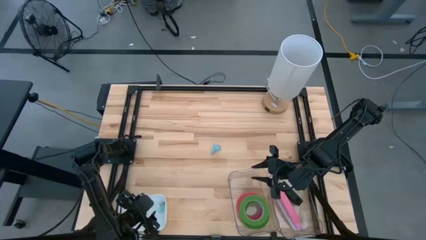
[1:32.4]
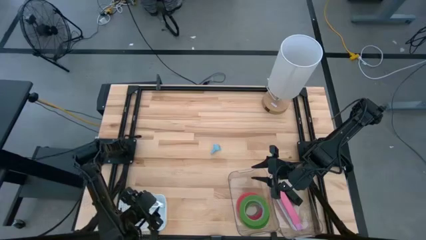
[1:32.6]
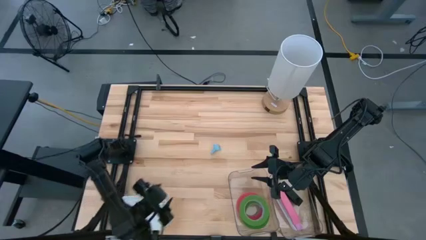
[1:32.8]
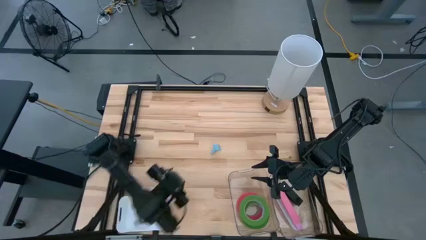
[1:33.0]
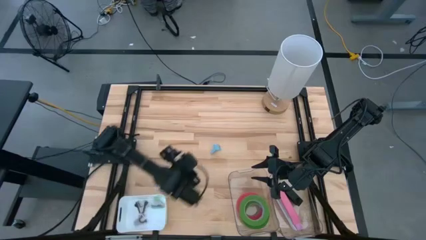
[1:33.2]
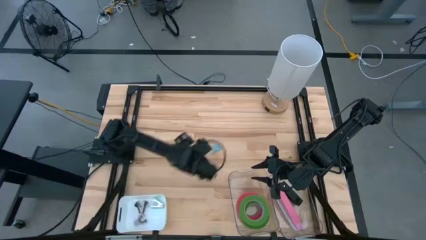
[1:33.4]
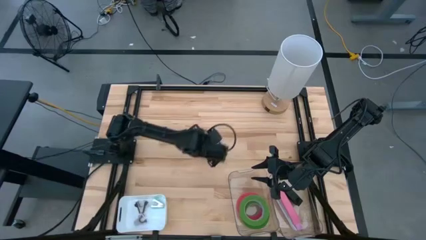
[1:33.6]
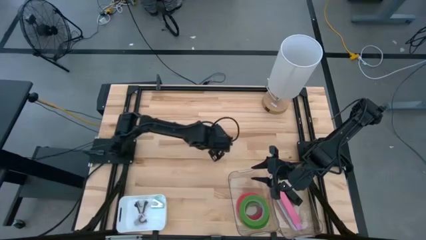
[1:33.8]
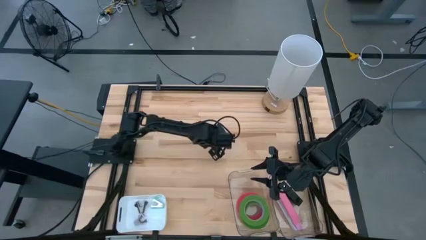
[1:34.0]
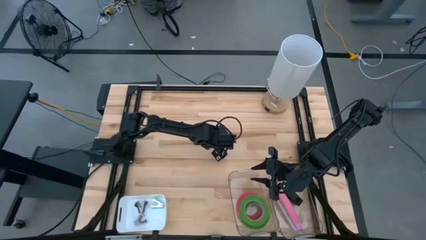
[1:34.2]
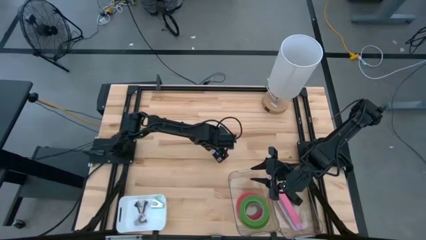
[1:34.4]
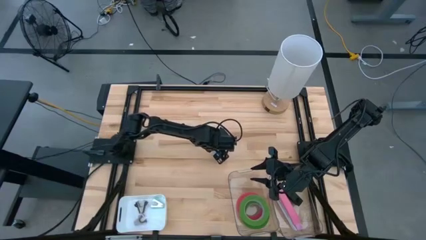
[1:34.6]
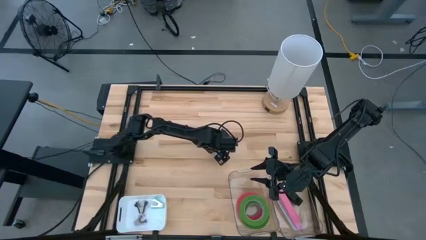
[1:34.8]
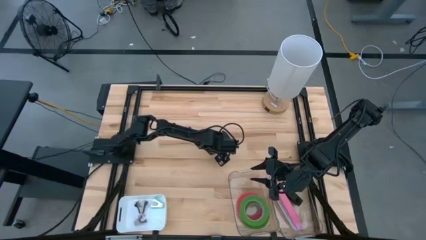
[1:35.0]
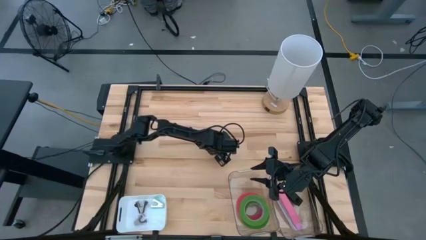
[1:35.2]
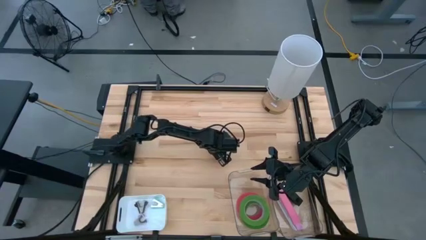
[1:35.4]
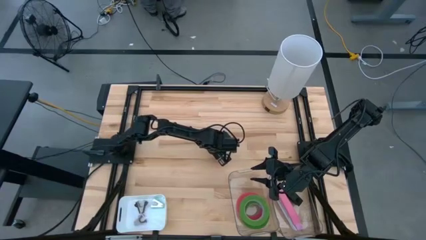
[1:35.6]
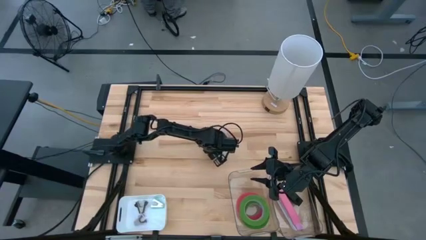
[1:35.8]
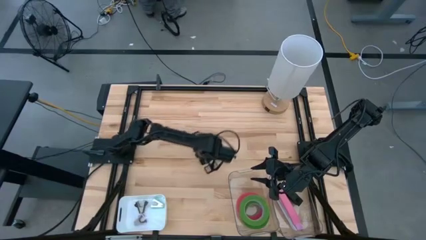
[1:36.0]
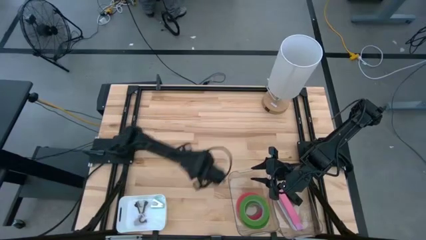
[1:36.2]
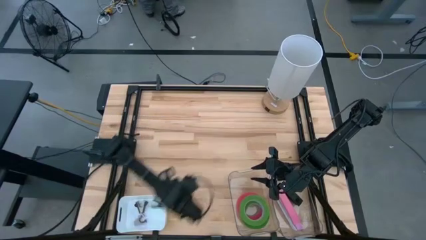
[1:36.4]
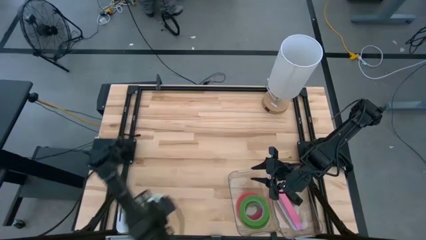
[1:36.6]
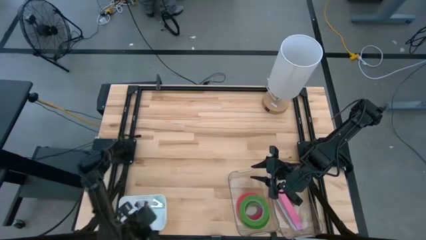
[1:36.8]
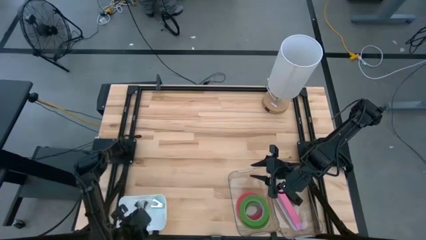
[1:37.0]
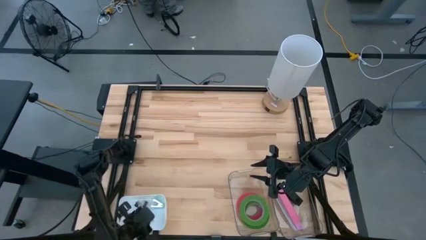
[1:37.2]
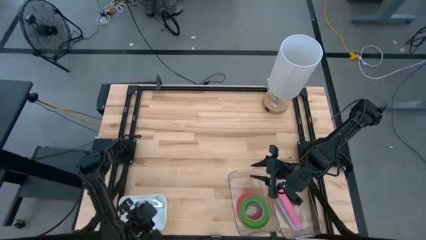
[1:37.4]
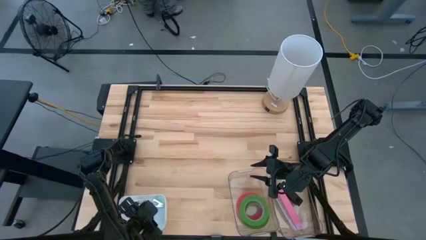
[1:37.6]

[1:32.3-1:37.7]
Task: Pick and place Stapler, Stapler remover, tape
Put the gray staple remover into the white bin

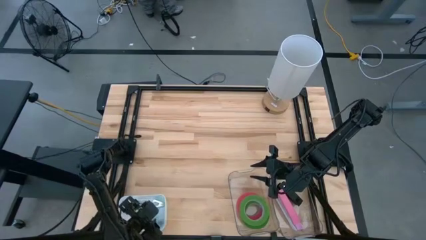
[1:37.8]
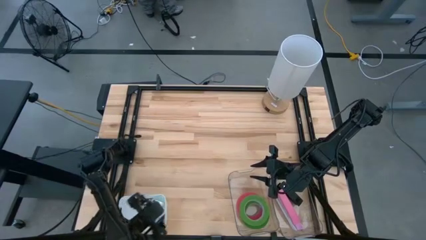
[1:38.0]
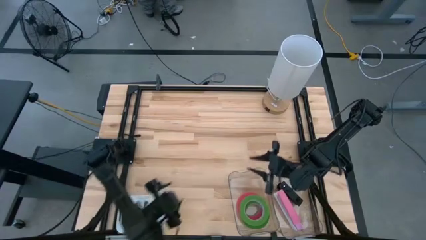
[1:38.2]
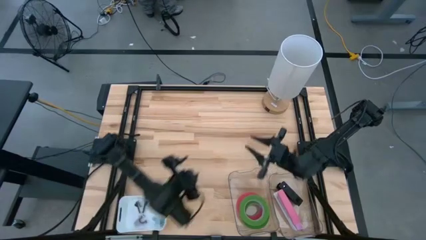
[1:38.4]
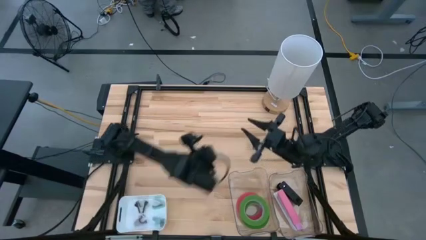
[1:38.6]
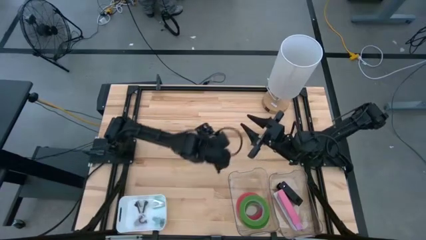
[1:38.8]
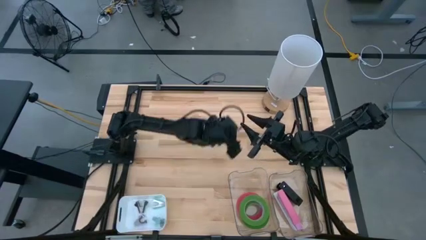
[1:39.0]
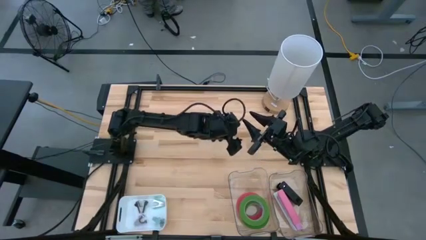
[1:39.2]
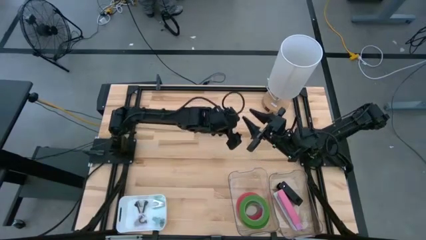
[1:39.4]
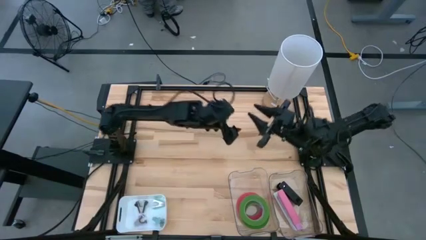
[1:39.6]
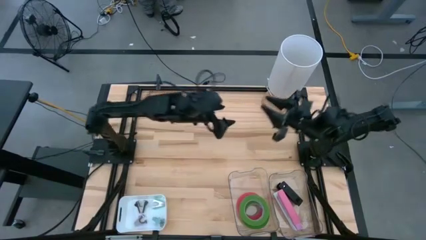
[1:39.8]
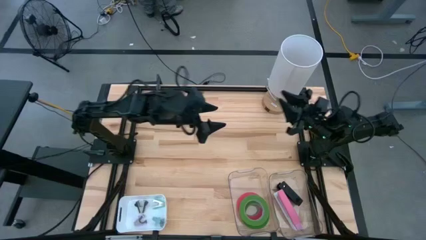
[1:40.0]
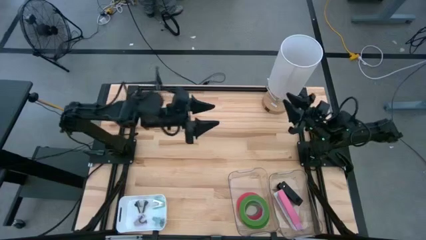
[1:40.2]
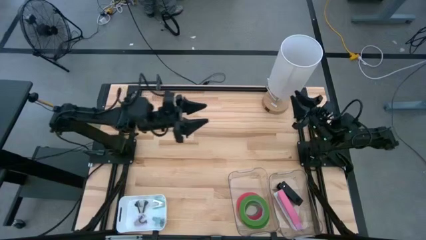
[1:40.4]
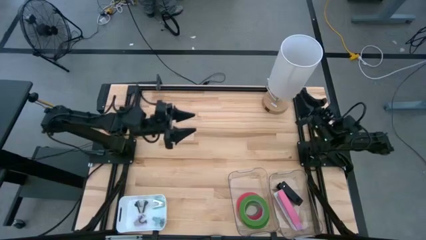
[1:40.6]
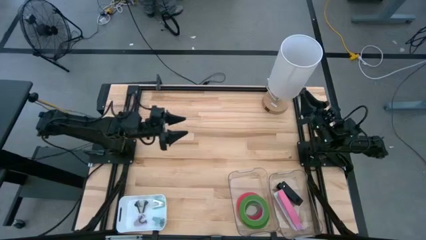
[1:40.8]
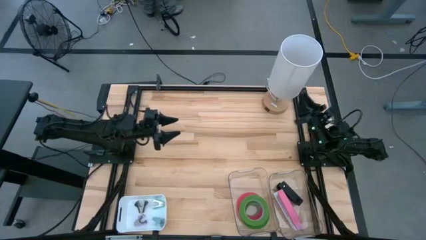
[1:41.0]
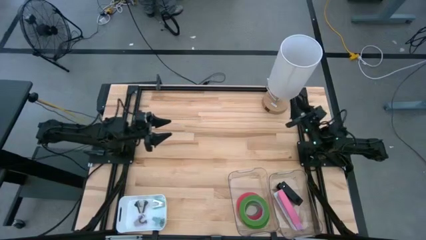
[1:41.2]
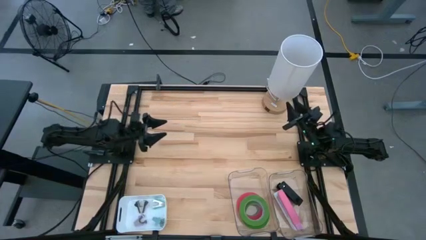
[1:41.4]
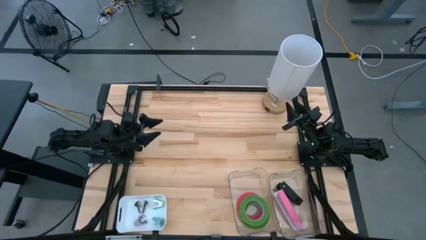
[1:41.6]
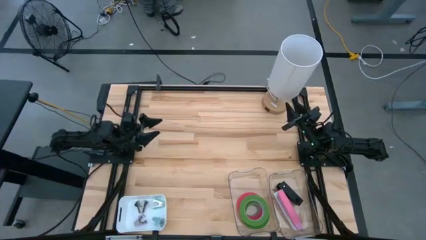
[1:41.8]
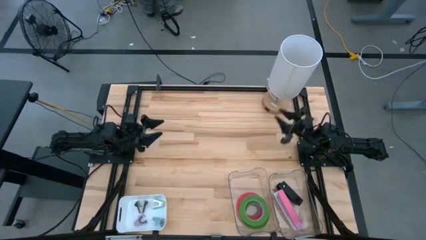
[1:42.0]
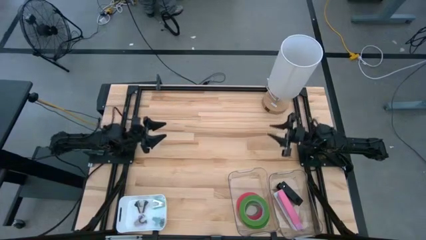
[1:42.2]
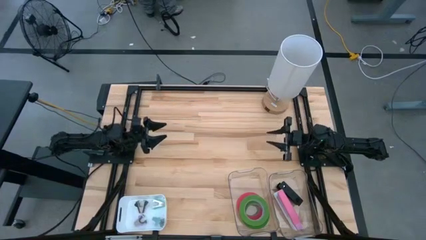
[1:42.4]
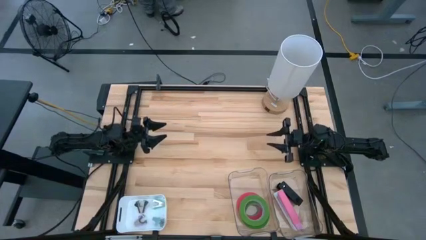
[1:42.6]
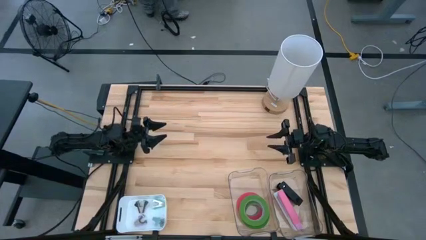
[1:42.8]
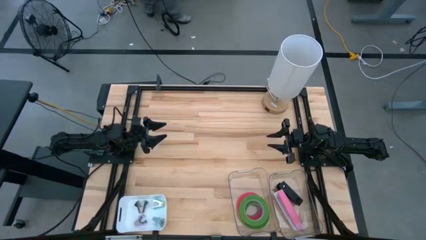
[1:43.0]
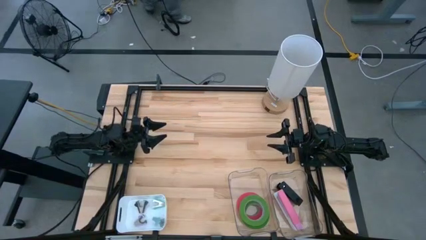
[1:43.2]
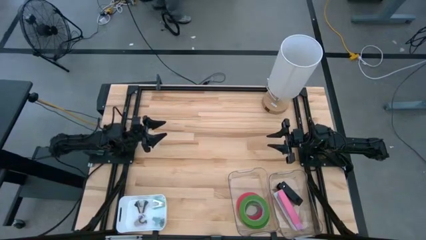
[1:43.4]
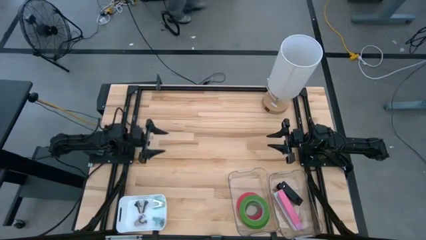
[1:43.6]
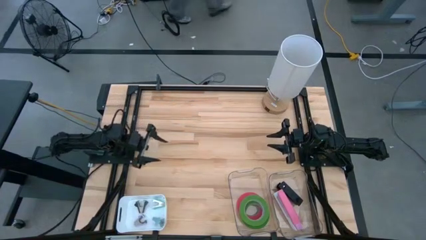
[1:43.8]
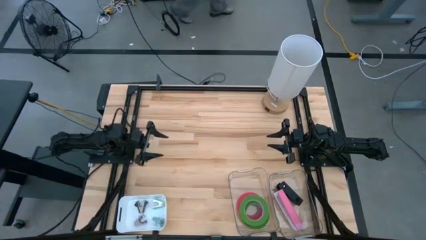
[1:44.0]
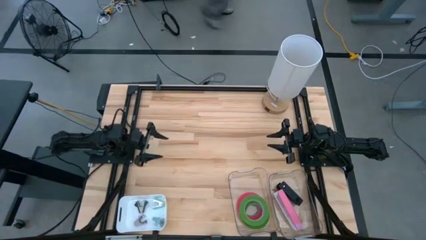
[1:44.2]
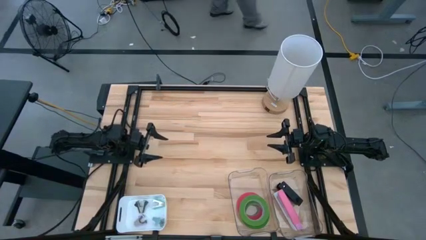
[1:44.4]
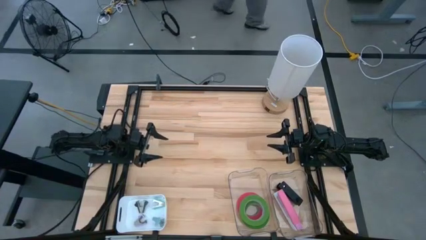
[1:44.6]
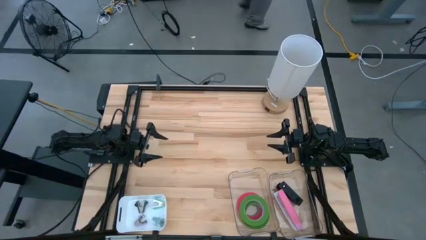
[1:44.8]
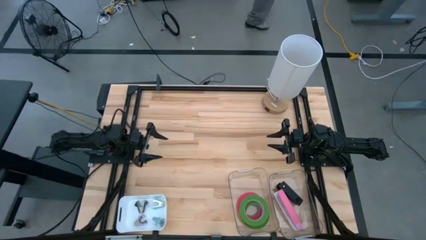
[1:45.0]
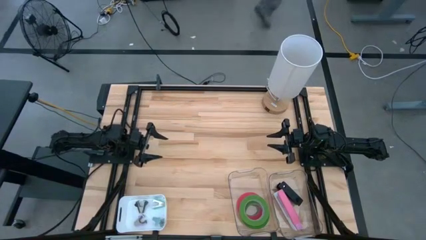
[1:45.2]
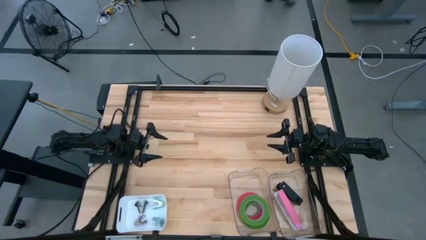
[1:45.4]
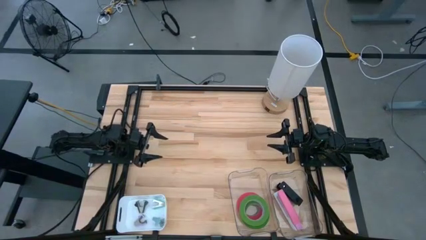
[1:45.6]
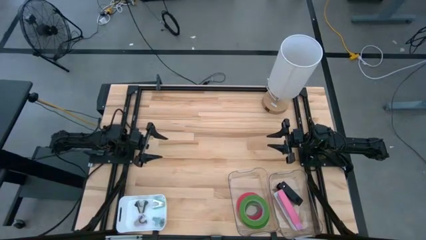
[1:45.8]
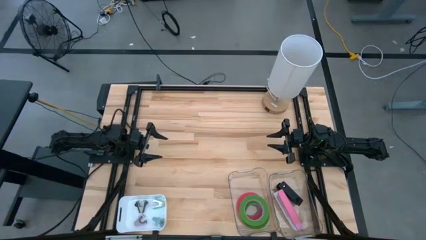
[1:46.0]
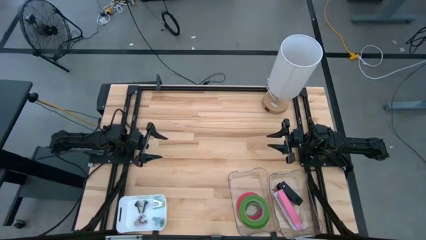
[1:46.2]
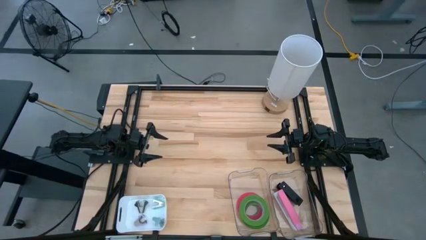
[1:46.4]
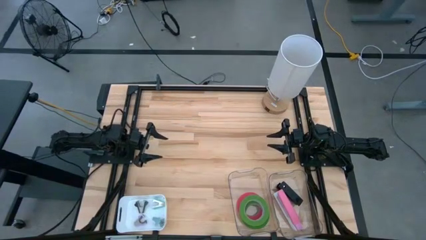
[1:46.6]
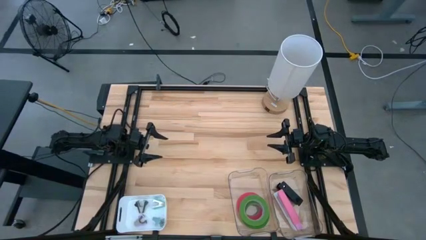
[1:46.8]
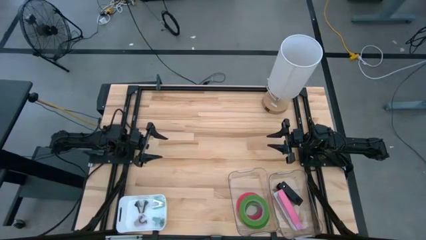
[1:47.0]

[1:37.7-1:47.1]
Return to Home Position
